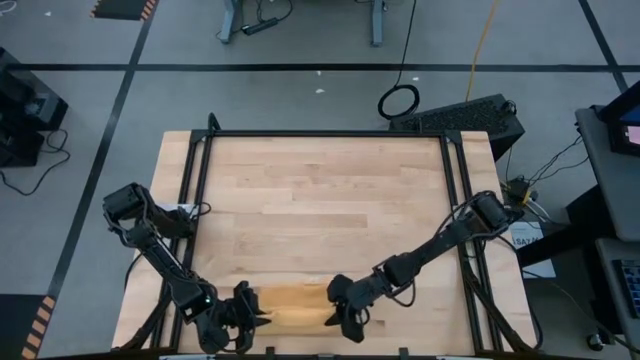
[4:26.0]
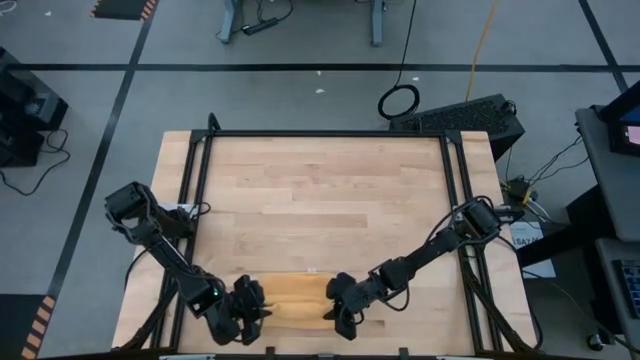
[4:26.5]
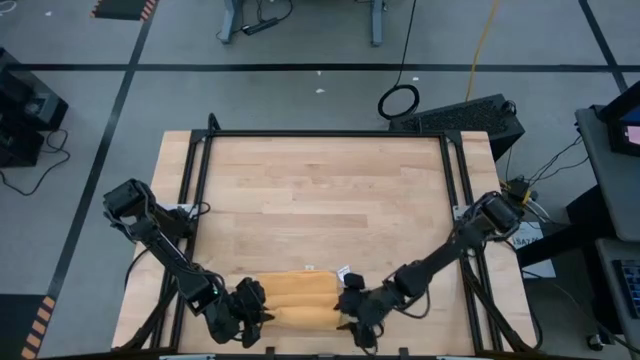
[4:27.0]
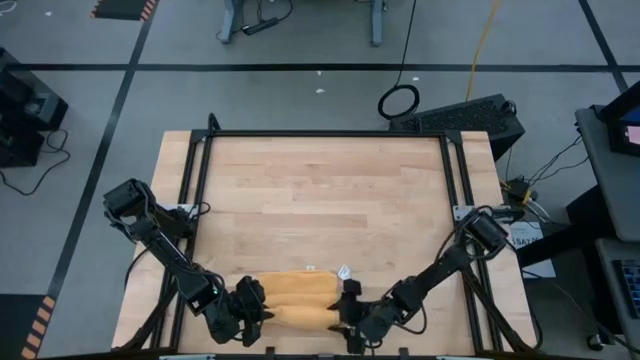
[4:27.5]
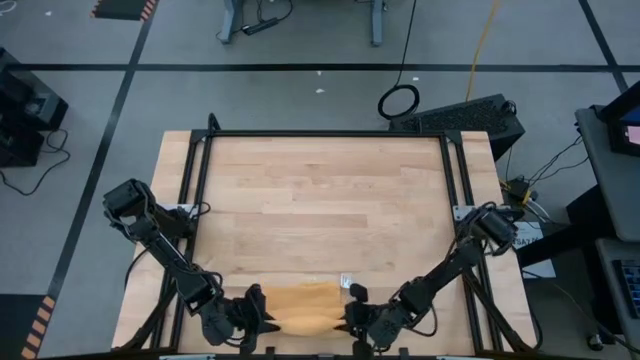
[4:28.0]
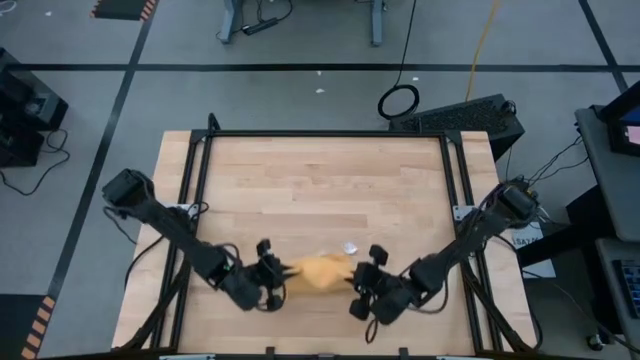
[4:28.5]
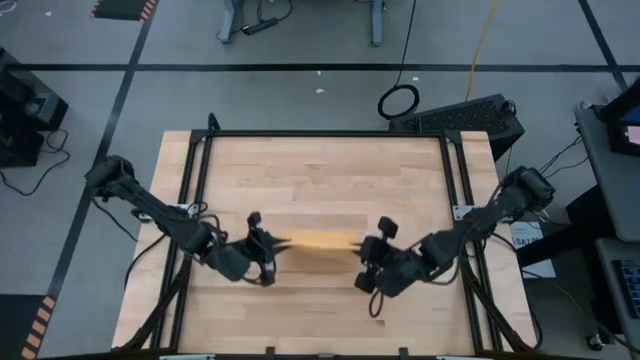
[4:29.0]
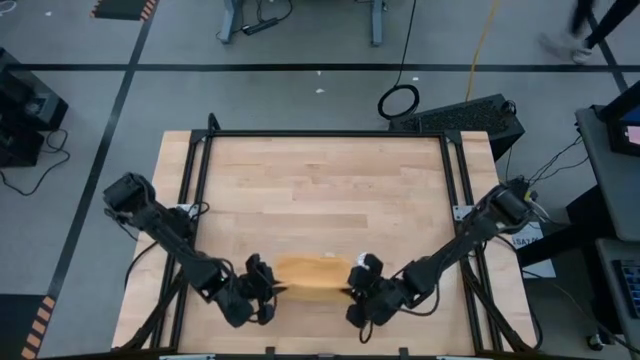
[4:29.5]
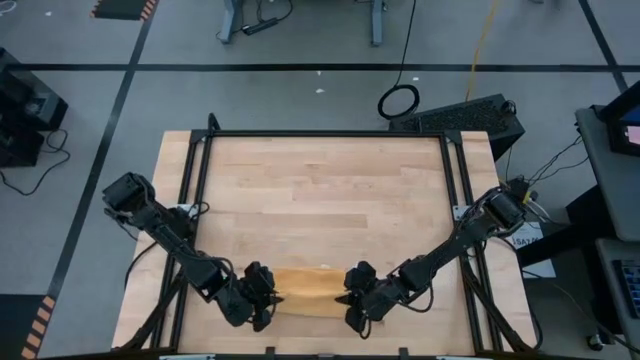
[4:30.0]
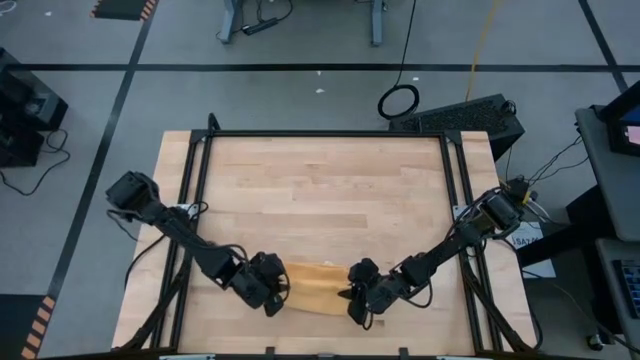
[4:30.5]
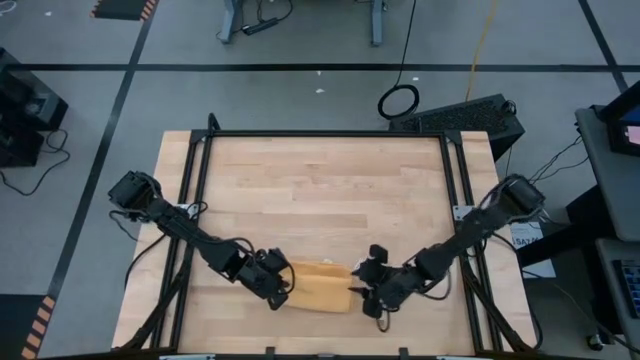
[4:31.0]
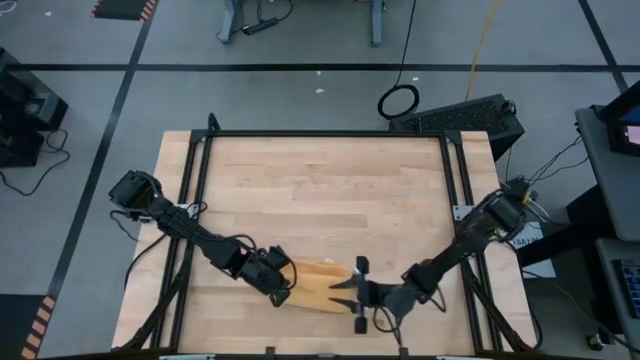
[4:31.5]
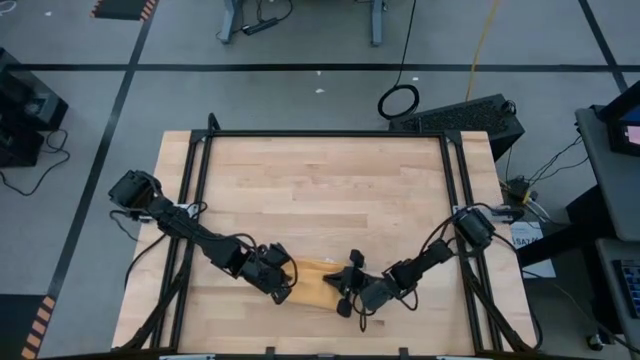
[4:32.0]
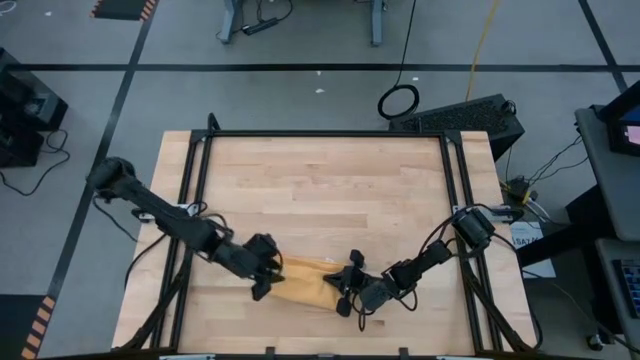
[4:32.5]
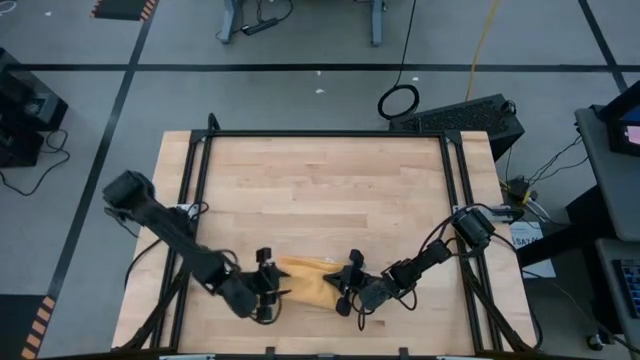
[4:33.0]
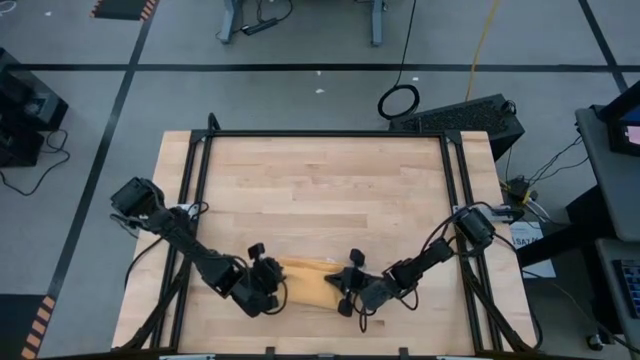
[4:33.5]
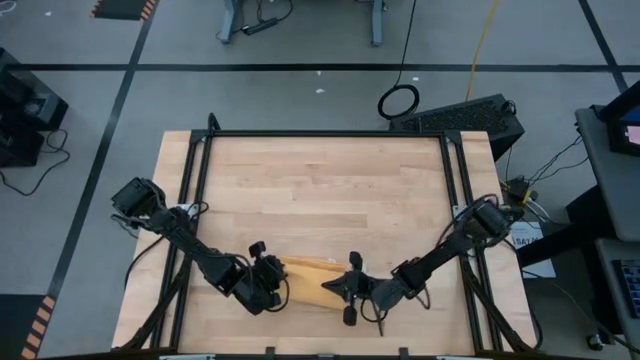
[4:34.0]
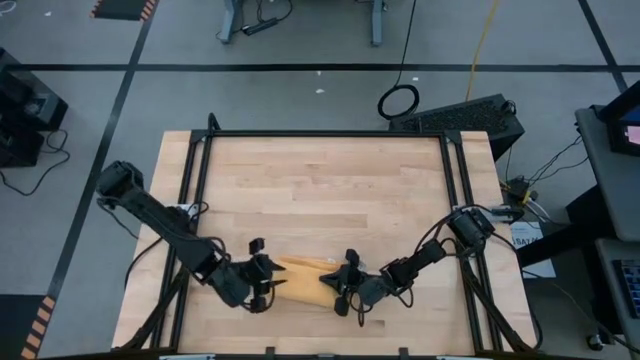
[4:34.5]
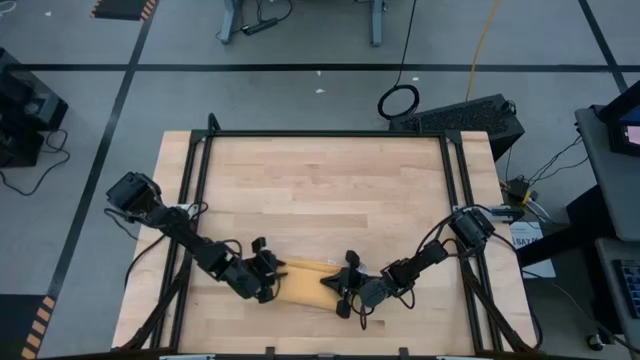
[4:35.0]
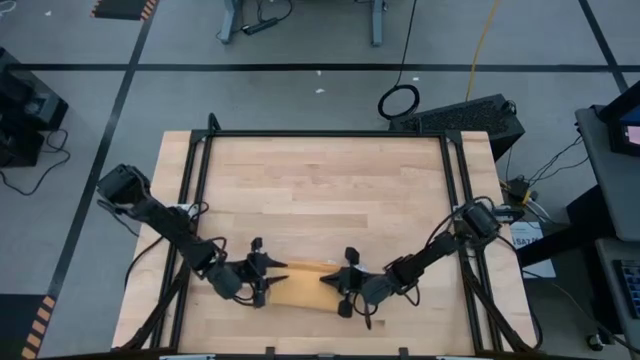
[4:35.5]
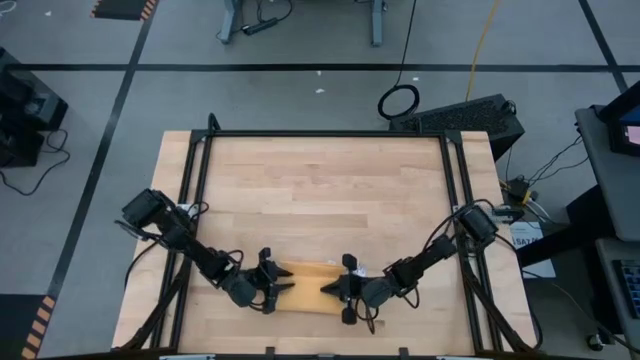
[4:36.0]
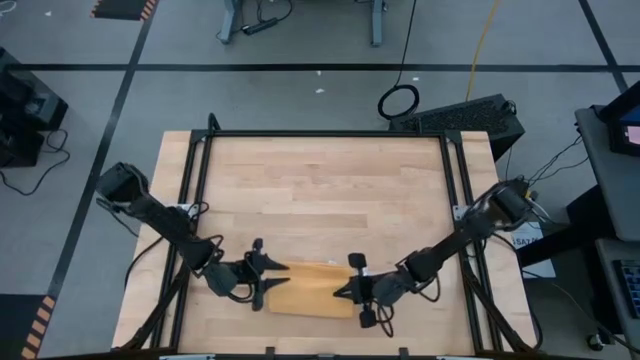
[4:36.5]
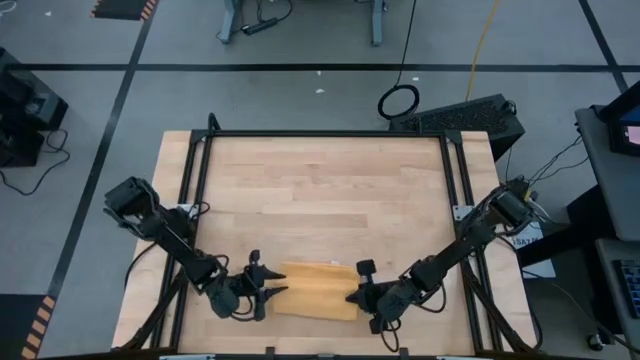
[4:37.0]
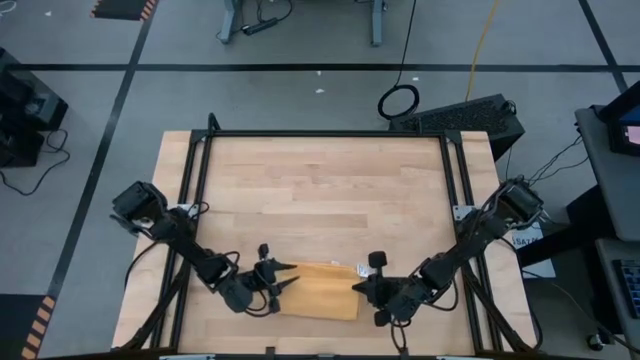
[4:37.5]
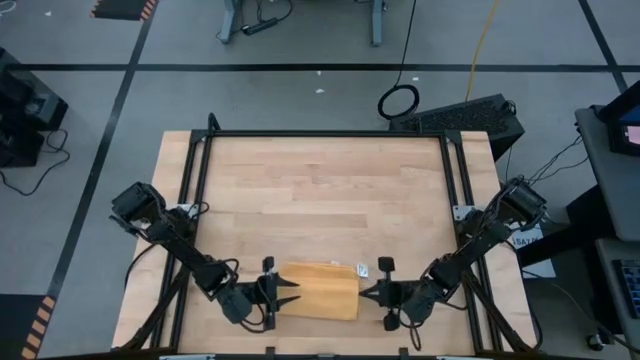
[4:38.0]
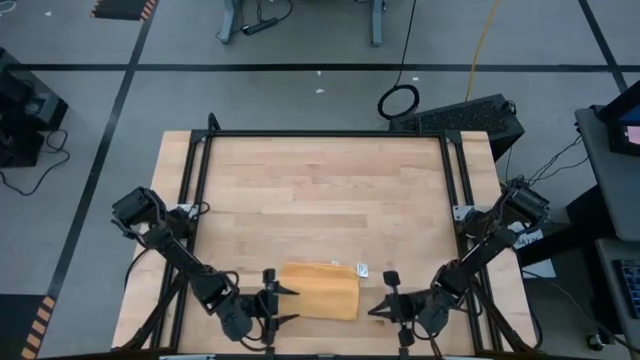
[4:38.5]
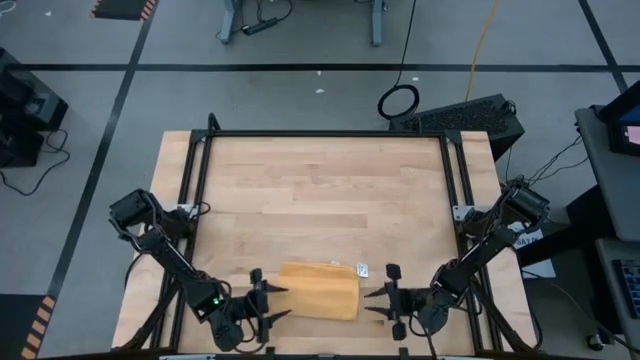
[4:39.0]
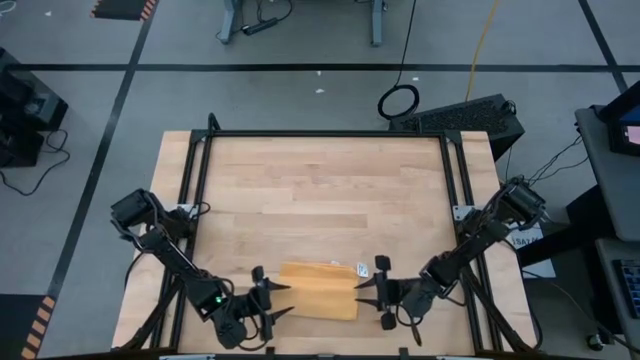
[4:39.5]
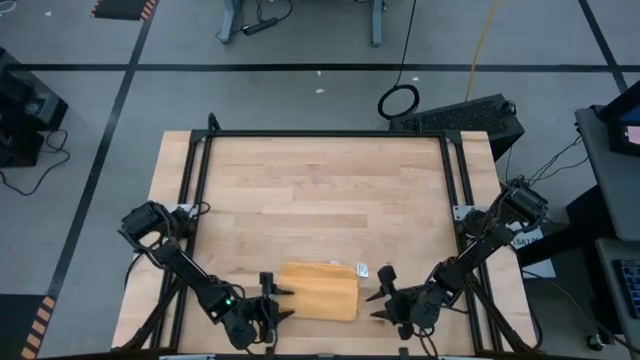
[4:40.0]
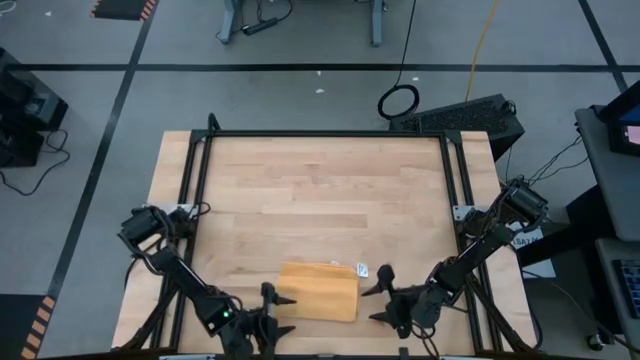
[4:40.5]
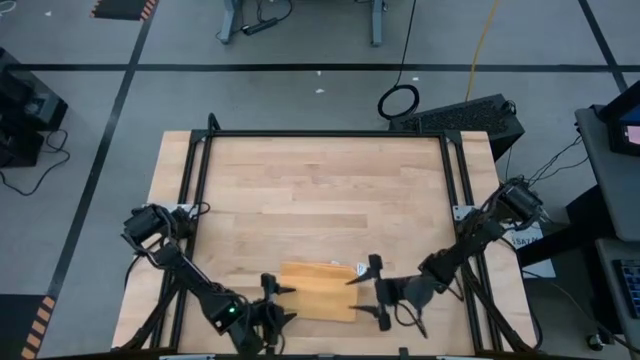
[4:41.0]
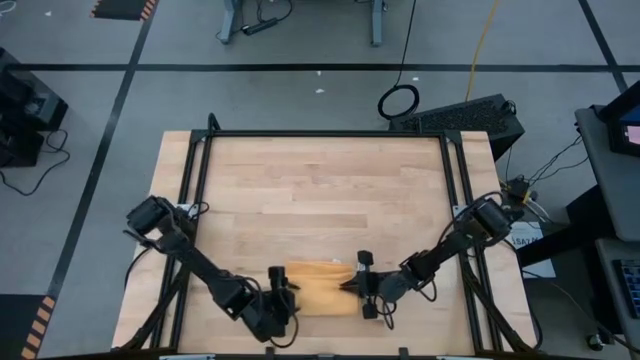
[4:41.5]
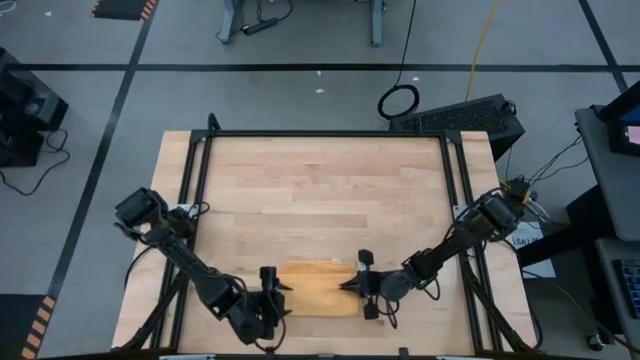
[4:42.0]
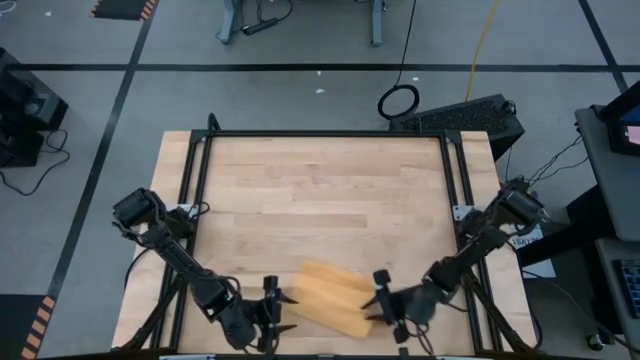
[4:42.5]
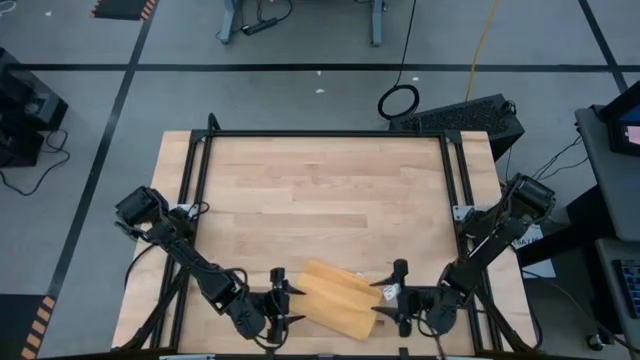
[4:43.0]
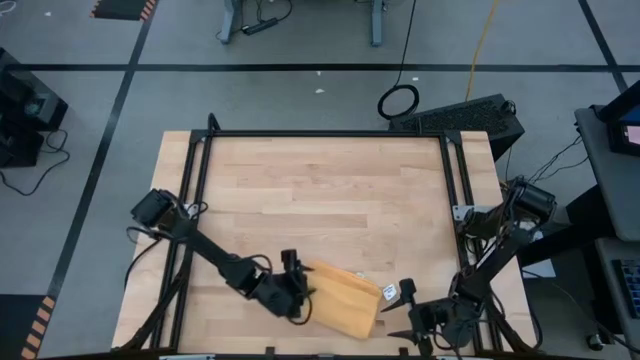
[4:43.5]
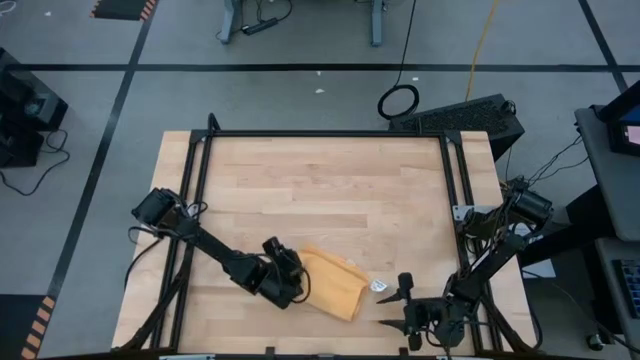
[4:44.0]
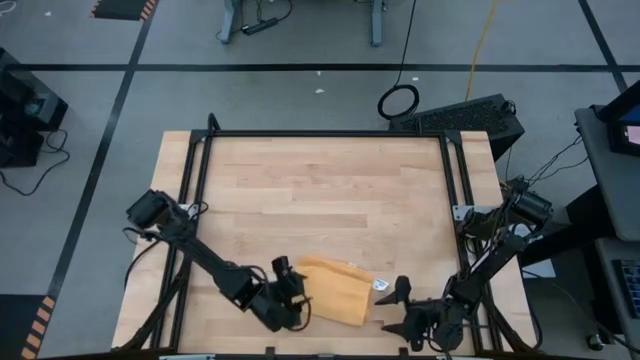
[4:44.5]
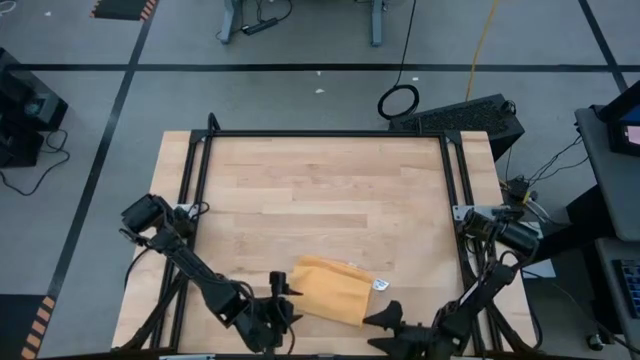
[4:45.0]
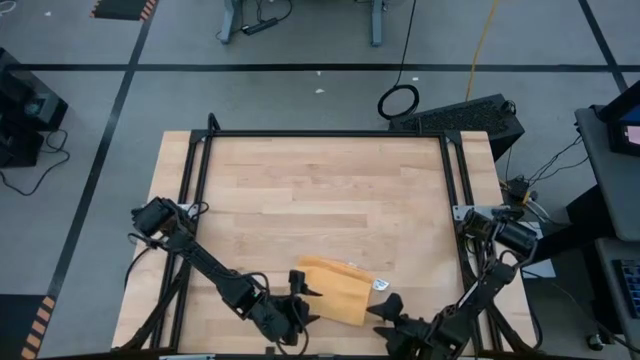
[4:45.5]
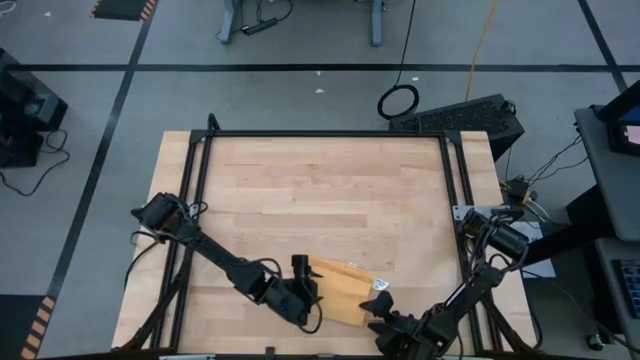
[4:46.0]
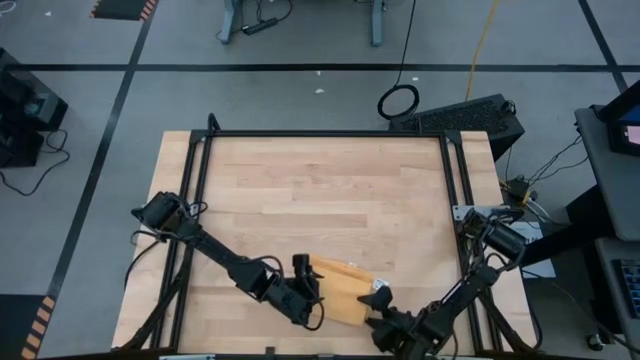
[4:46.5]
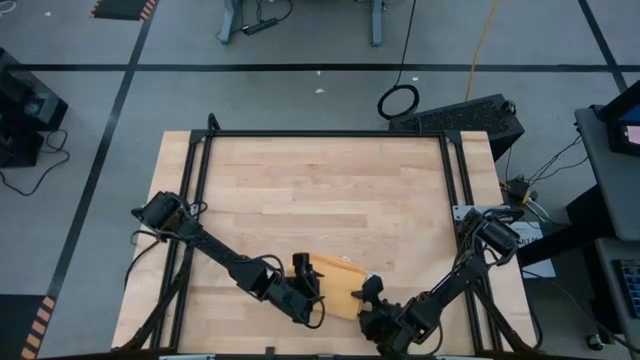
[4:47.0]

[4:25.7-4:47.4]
Task: Roll towel
Roll the yellow towel
